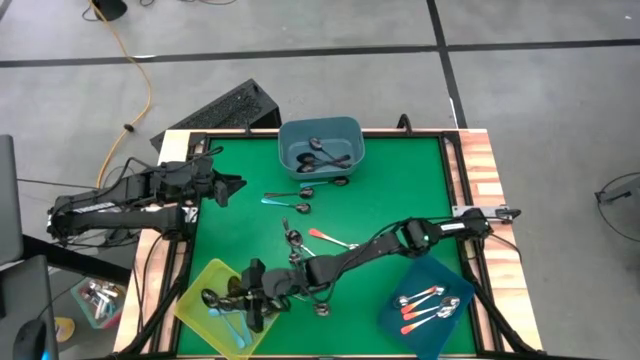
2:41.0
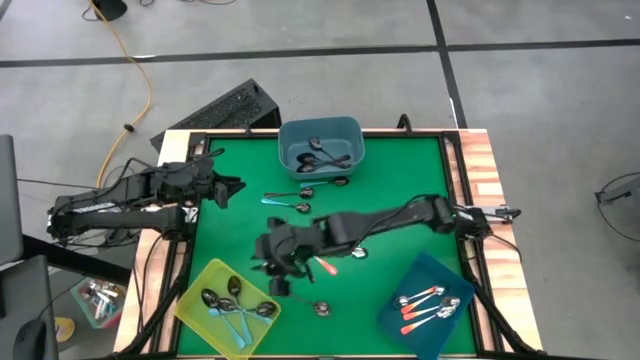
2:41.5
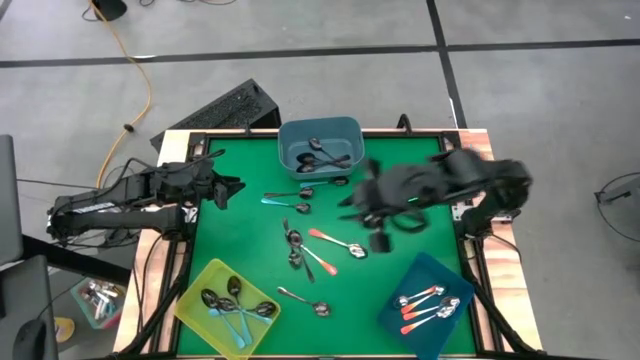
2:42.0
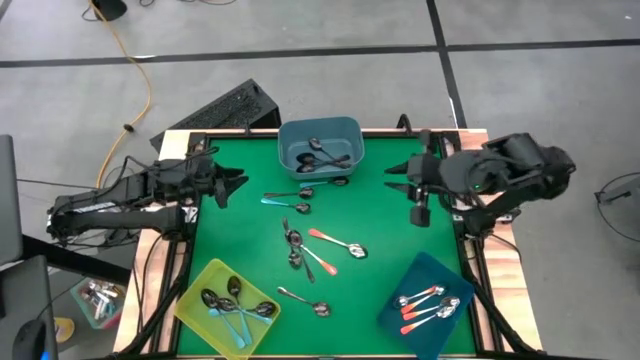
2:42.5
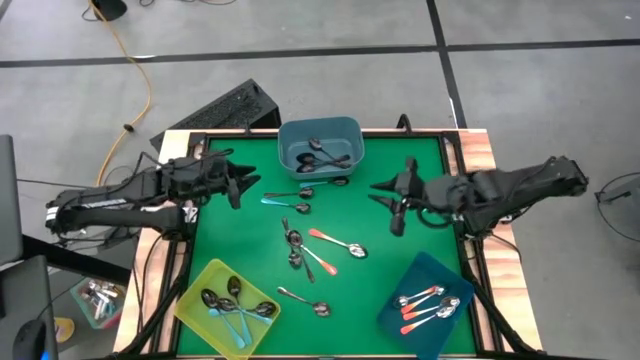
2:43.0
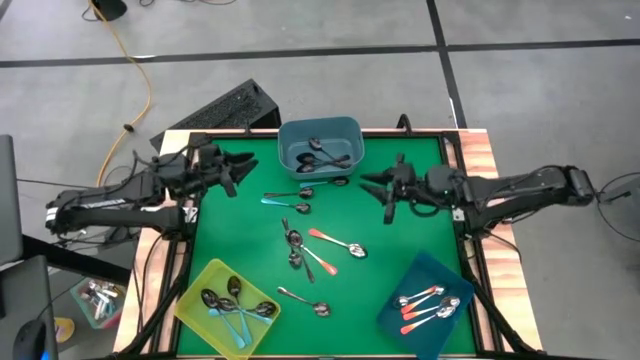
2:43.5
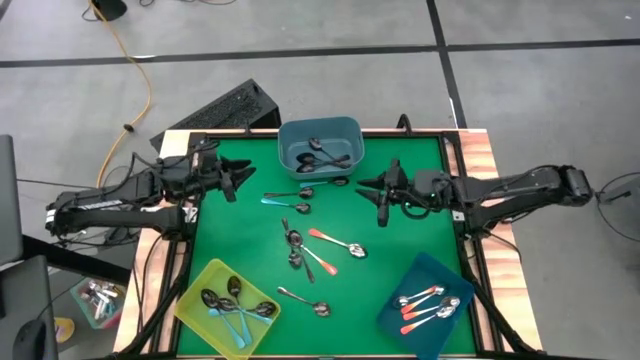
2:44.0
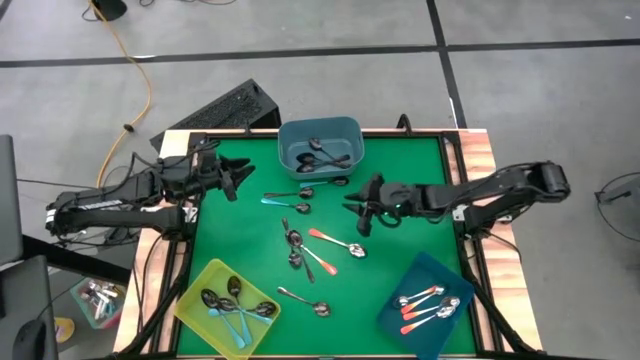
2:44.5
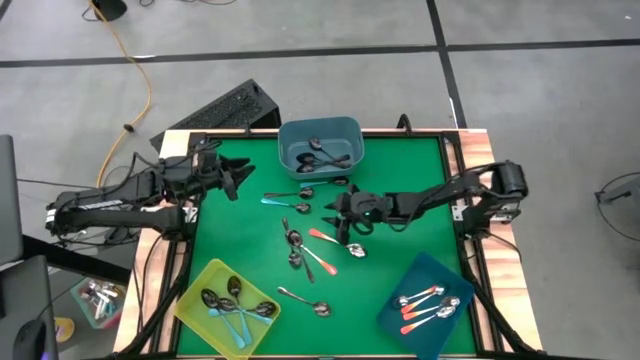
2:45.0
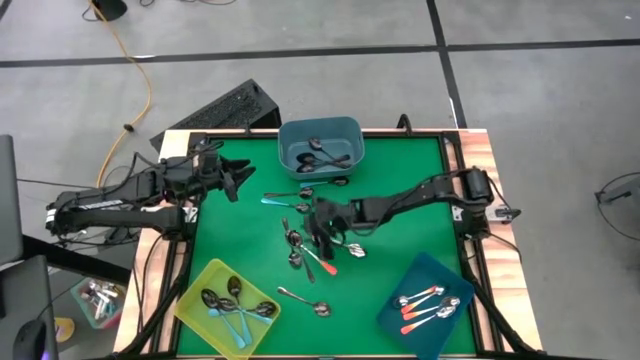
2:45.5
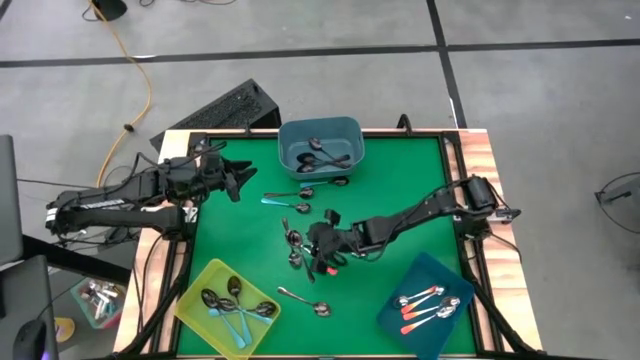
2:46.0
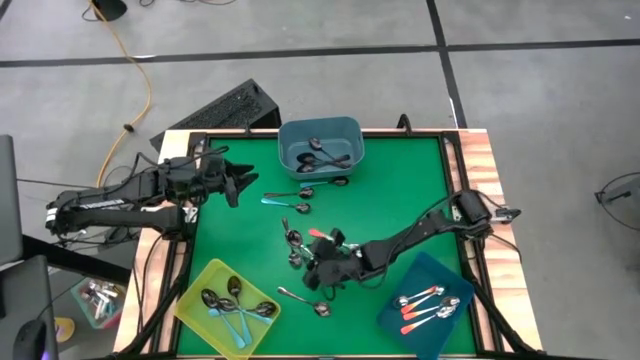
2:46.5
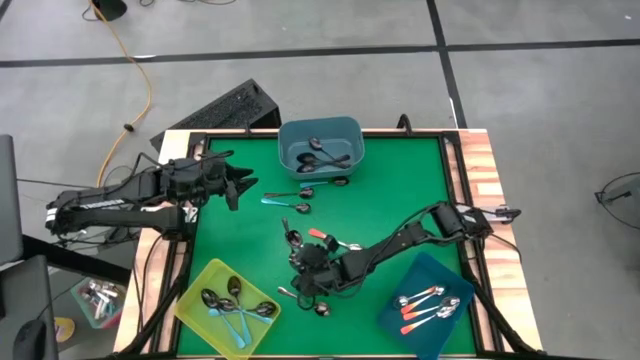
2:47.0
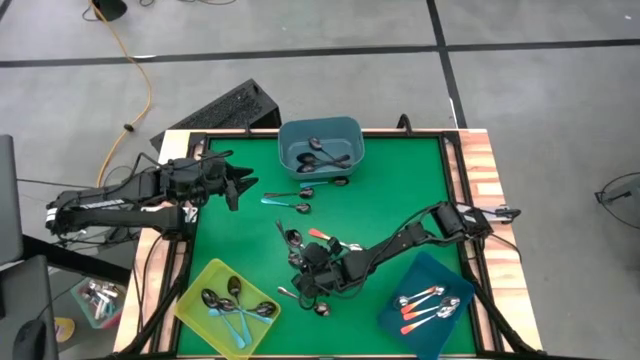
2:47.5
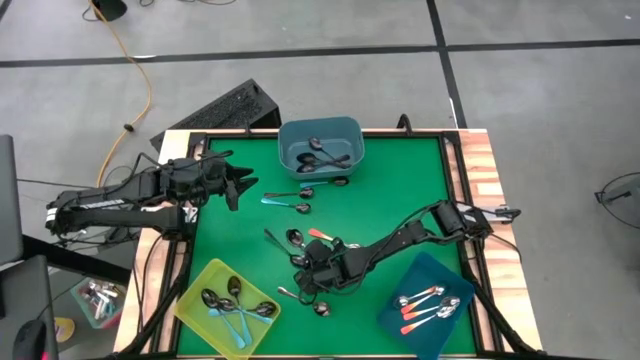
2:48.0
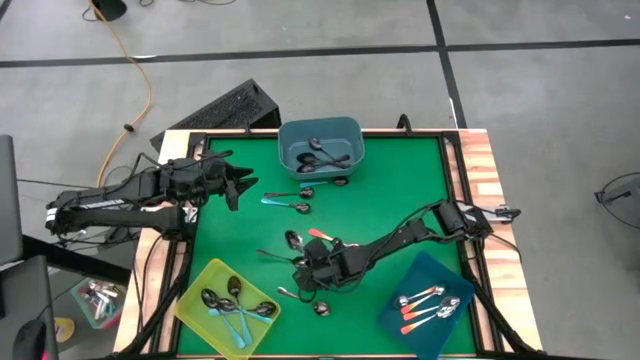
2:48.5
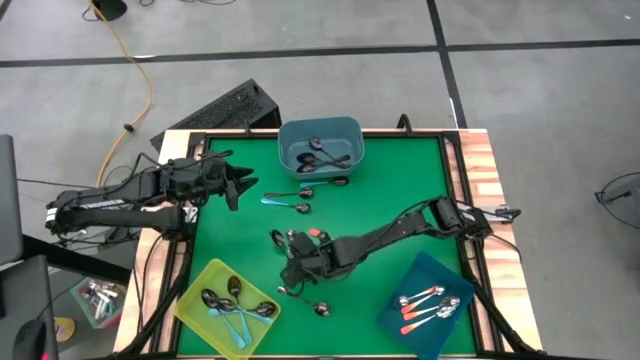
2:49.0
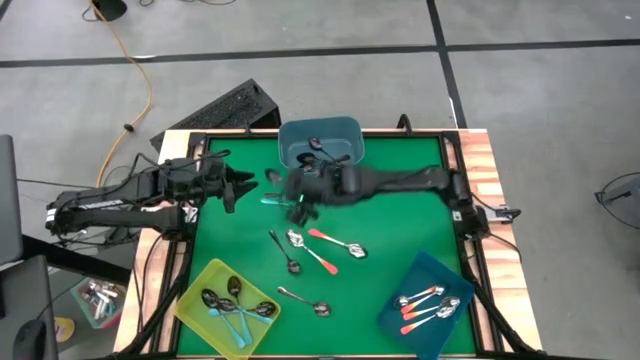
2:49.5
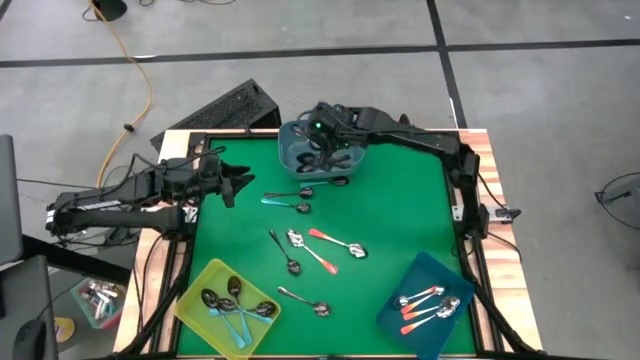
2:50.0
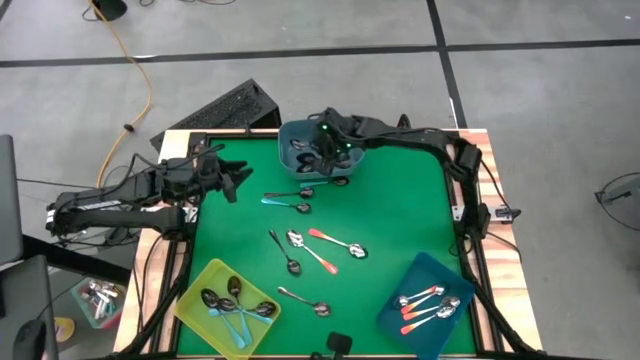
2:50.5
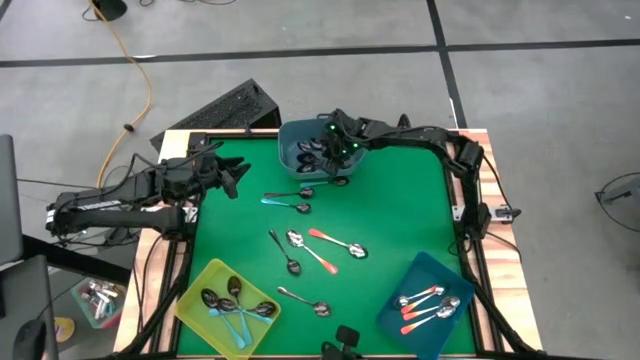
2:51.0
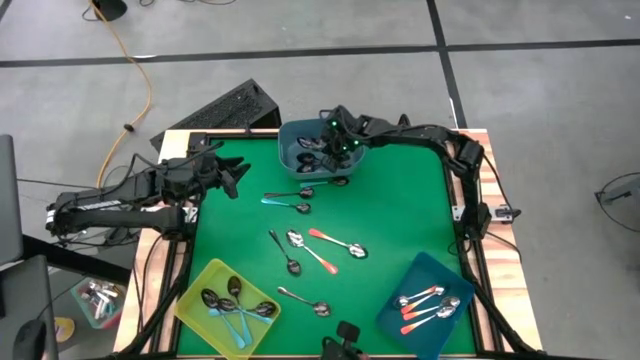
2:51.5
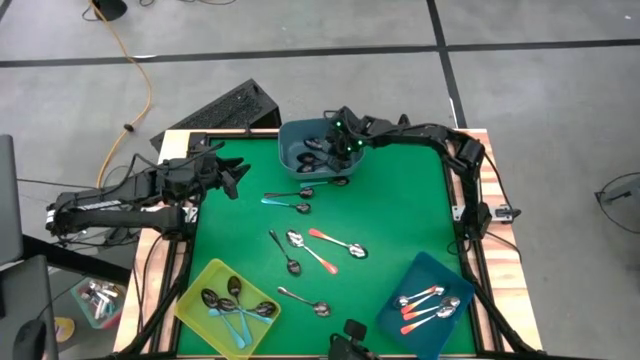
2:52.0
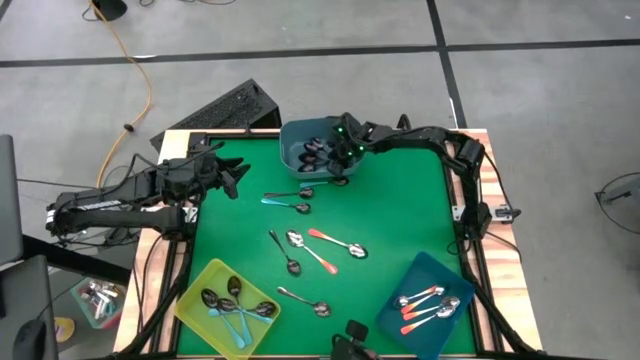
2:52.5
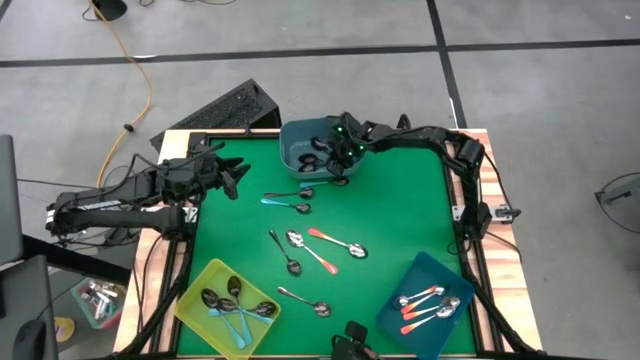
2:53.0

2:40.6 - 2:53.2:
Task: Sort silverware by color (type)
Put the black spoon into the light blue bin

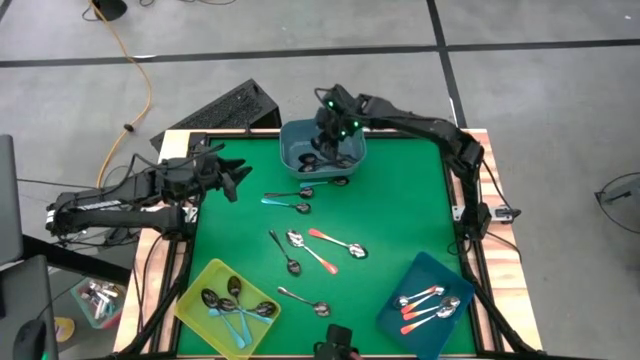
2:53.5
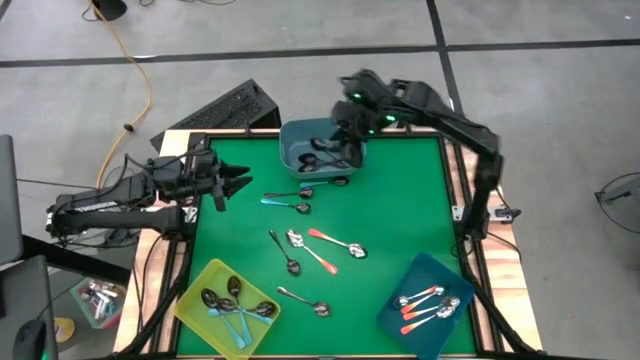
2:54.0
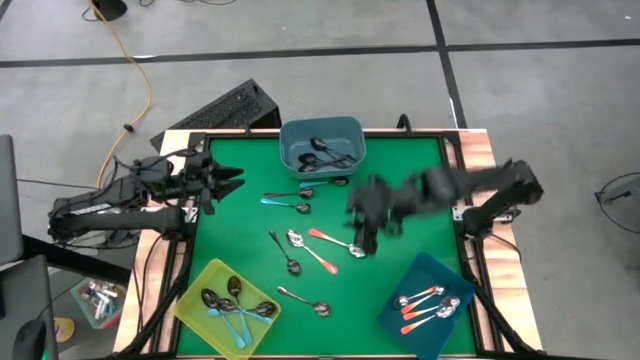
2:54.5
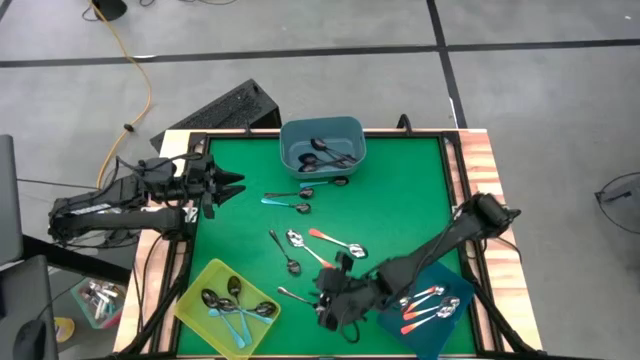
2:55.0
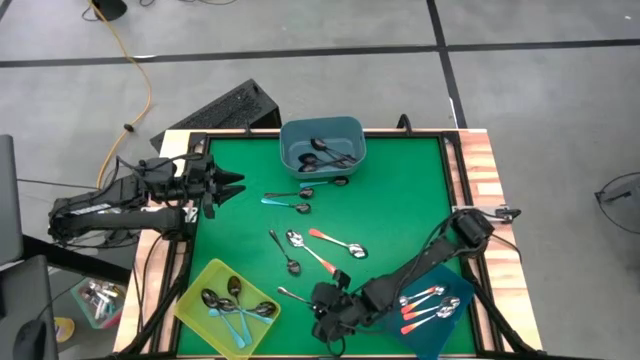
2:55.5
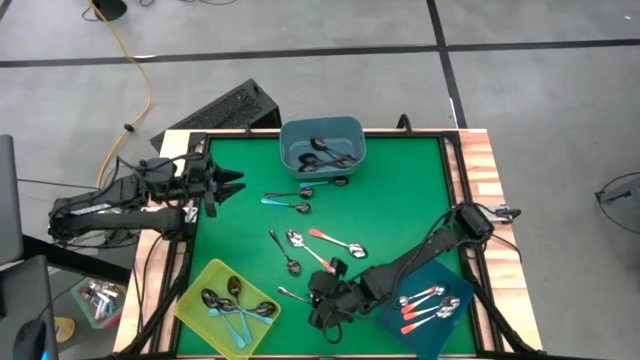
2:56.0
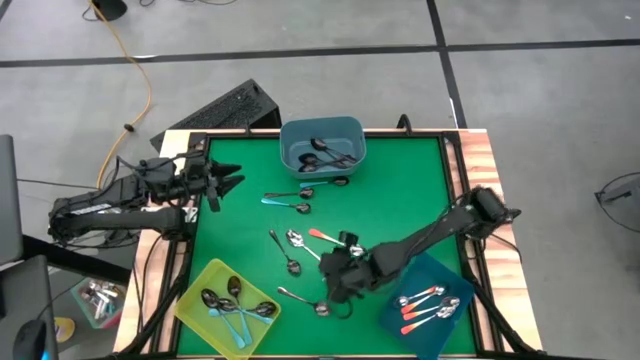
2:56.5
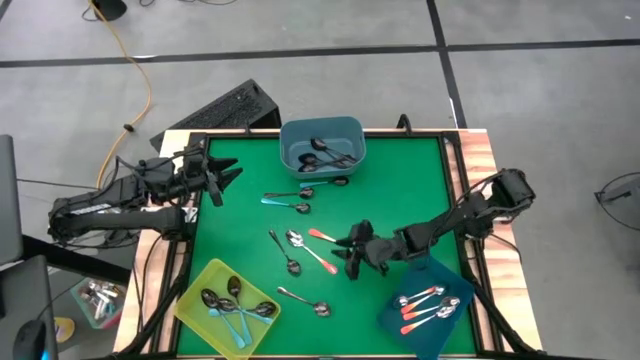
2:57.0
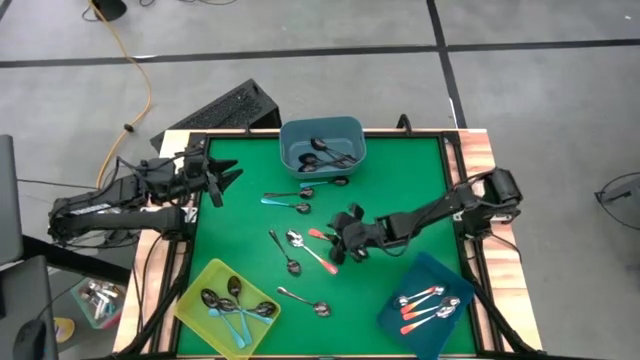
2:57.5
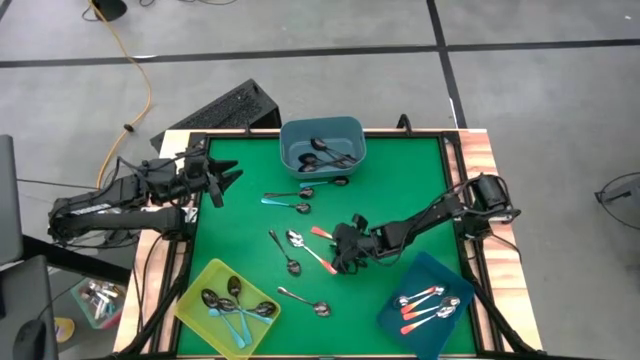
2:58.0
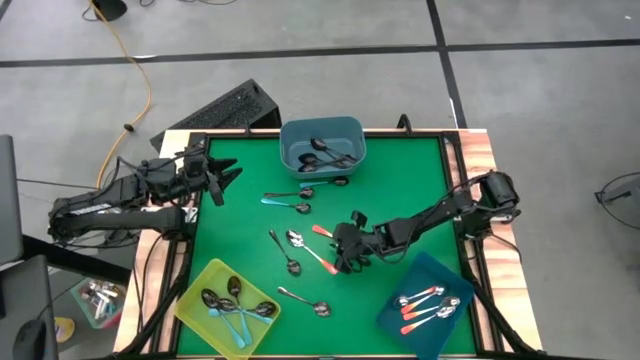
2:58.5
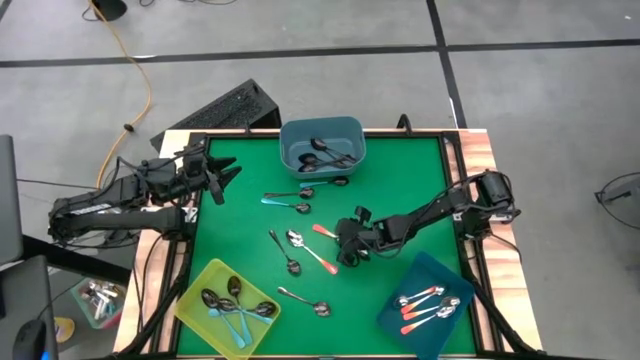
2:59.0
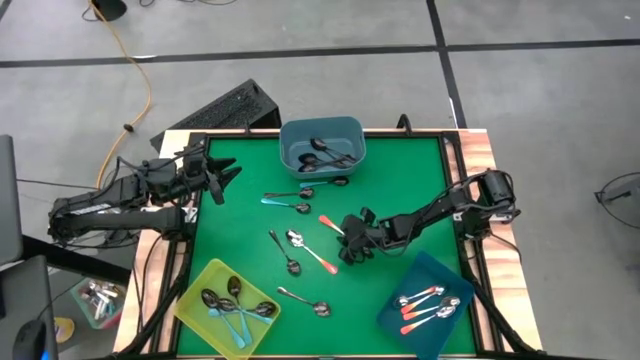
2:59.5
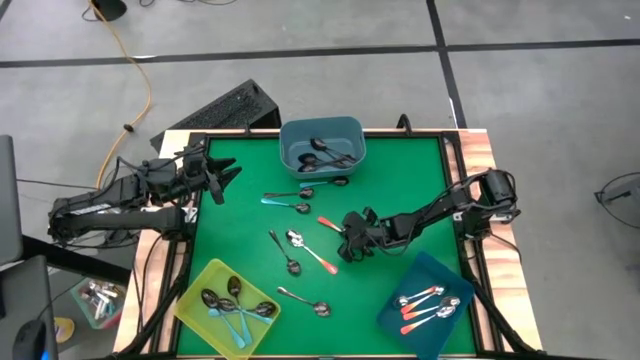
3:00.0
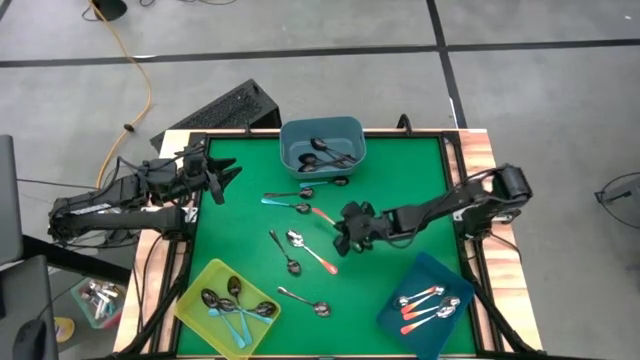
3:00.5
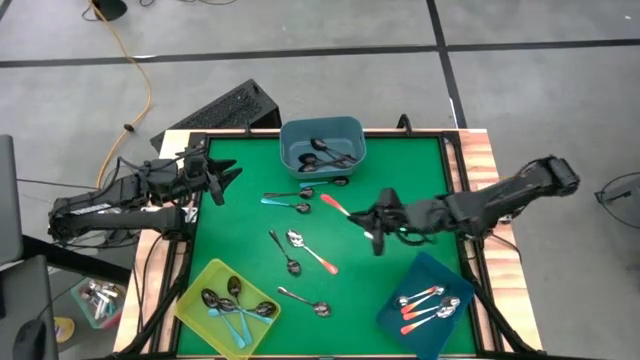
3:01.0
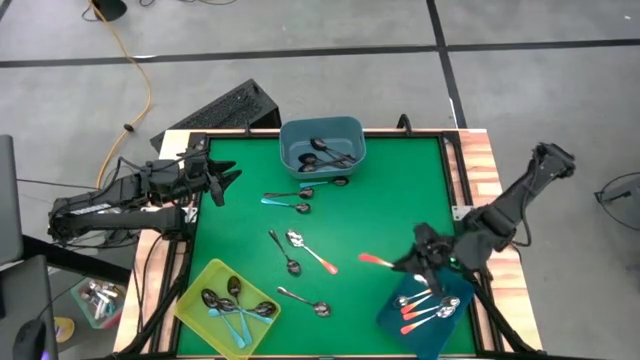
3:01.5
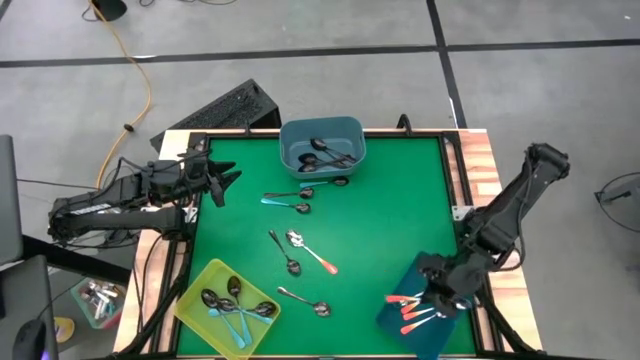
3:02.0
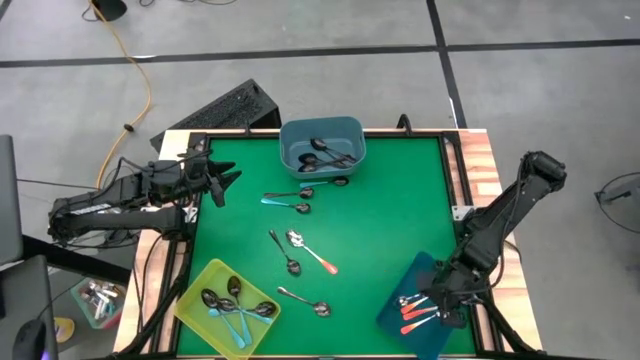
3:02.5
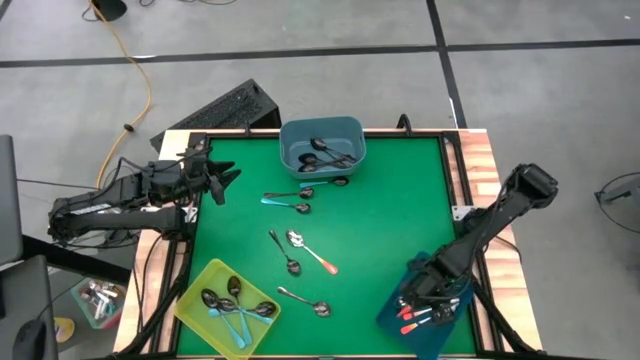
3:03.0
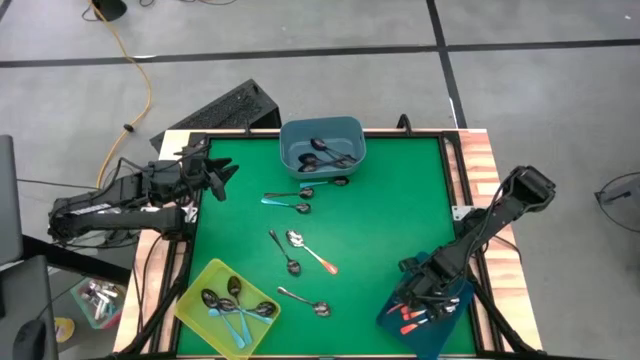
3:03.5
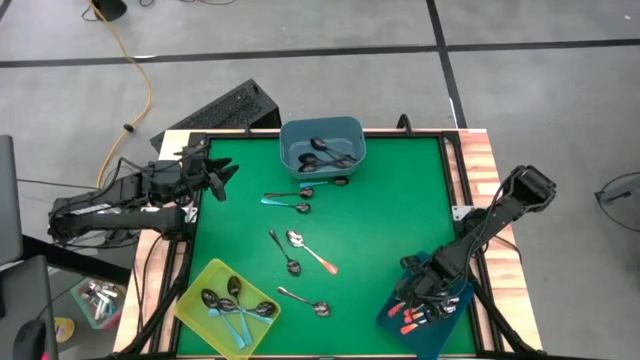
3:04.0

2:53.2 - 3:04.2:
Put the orange spoon into the blue bin
